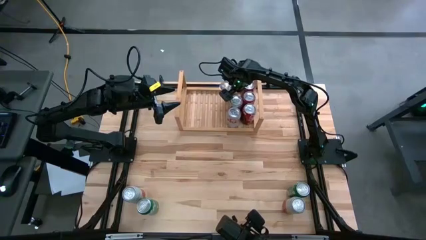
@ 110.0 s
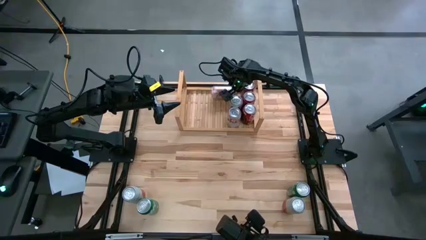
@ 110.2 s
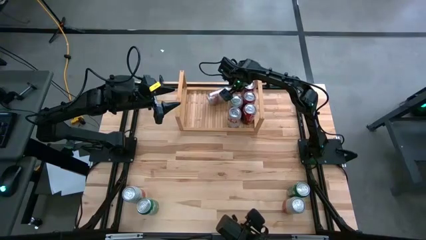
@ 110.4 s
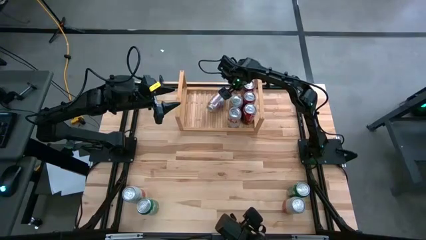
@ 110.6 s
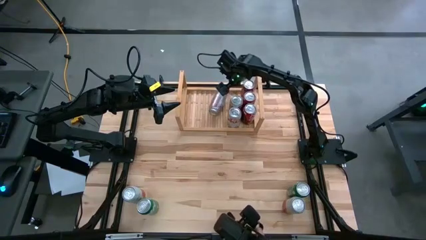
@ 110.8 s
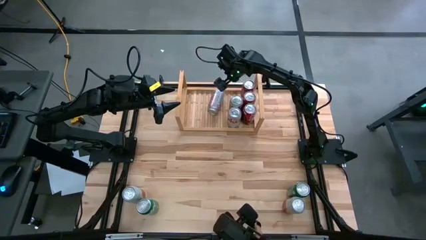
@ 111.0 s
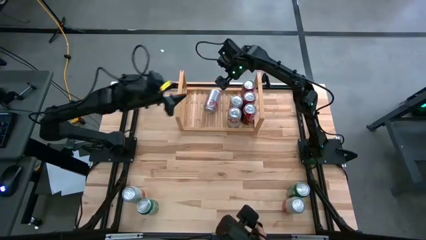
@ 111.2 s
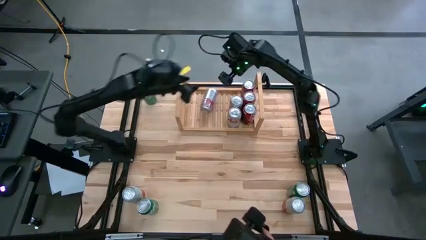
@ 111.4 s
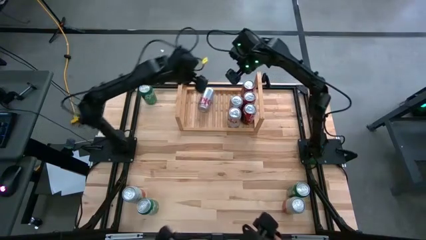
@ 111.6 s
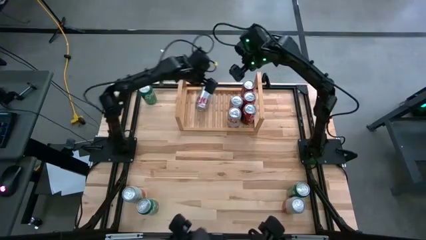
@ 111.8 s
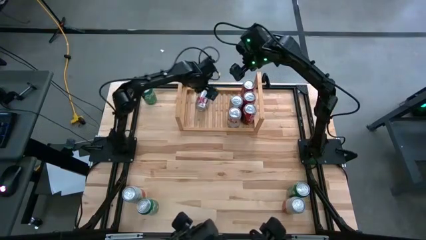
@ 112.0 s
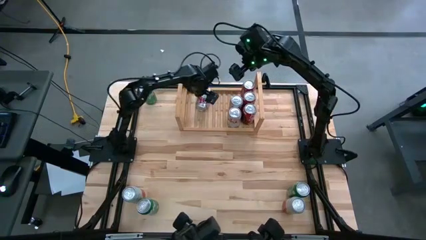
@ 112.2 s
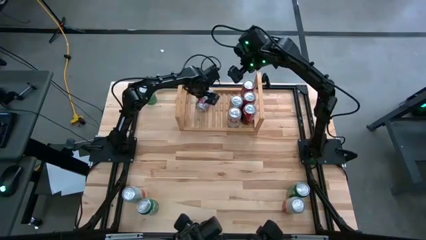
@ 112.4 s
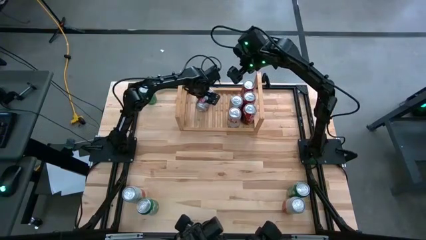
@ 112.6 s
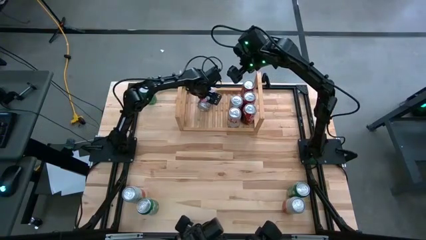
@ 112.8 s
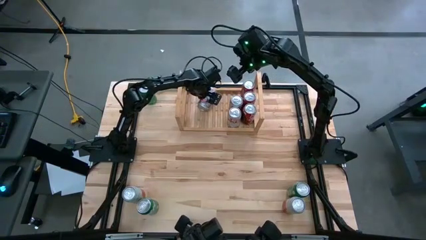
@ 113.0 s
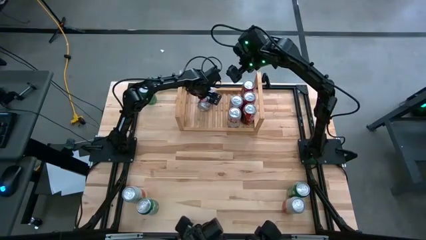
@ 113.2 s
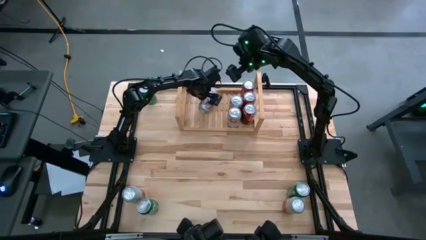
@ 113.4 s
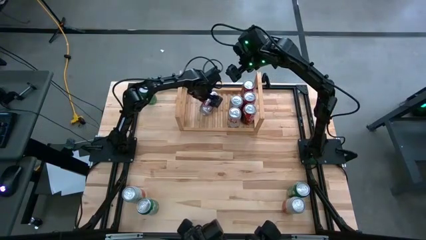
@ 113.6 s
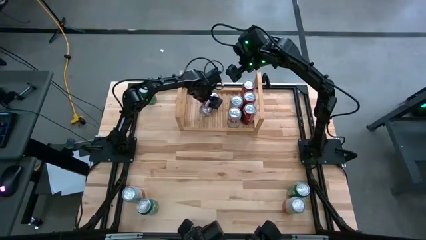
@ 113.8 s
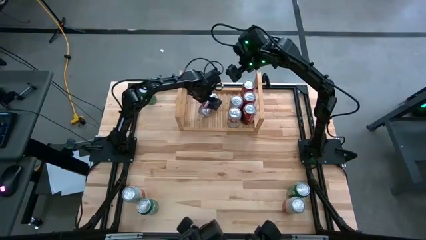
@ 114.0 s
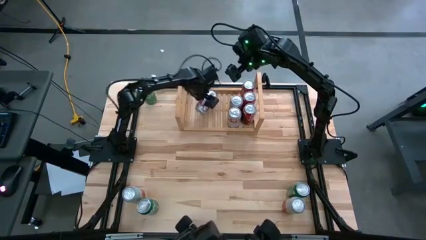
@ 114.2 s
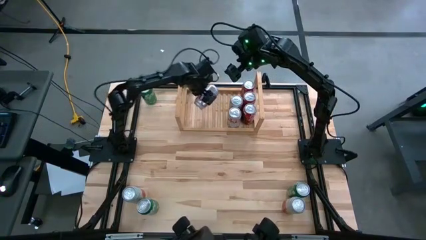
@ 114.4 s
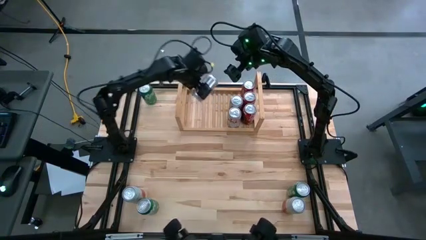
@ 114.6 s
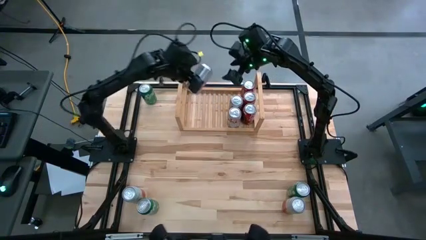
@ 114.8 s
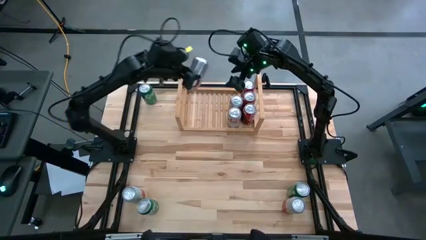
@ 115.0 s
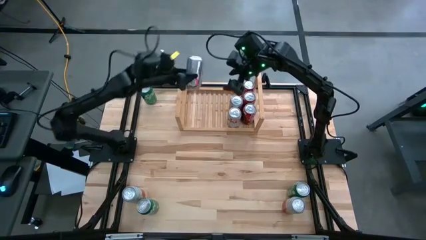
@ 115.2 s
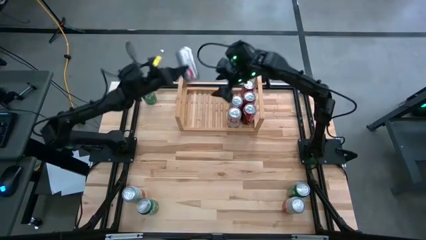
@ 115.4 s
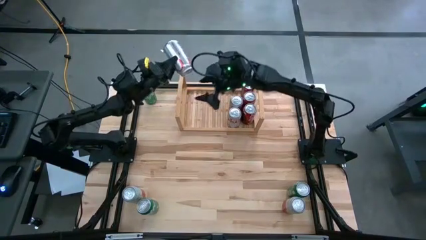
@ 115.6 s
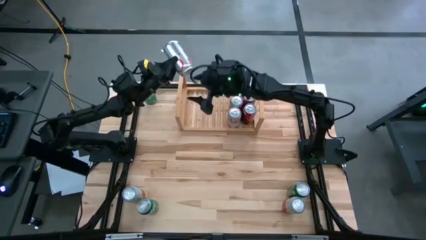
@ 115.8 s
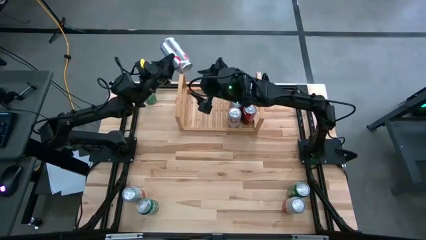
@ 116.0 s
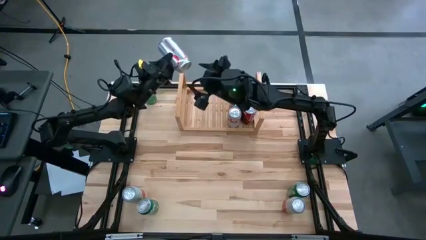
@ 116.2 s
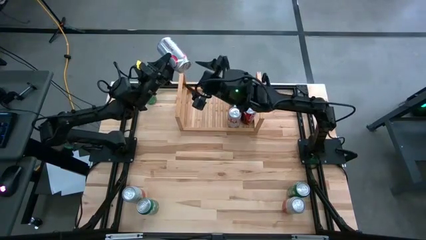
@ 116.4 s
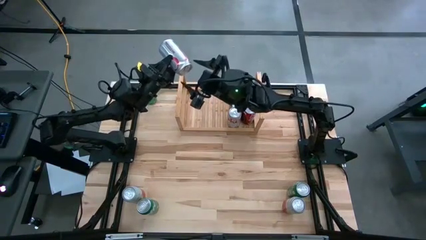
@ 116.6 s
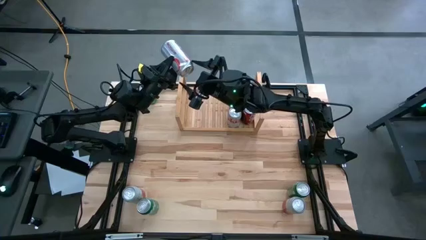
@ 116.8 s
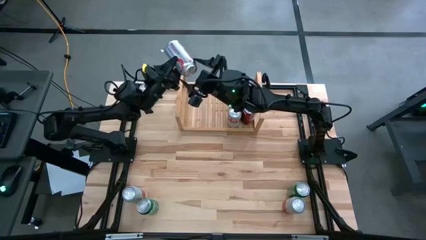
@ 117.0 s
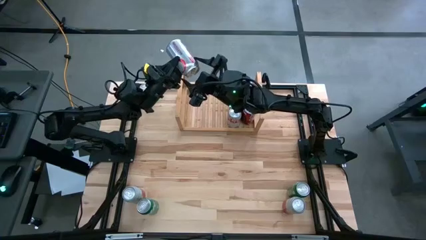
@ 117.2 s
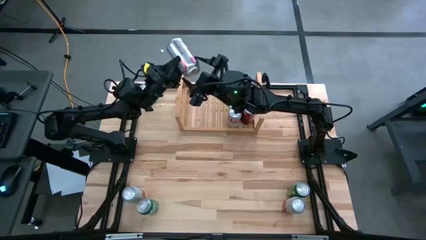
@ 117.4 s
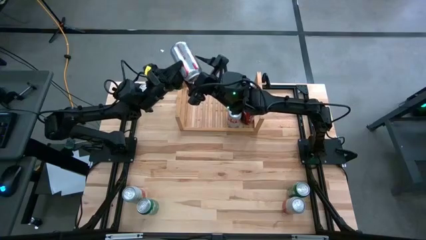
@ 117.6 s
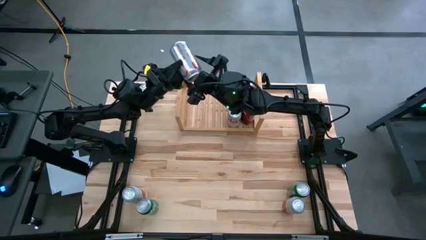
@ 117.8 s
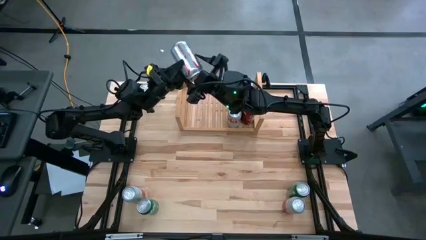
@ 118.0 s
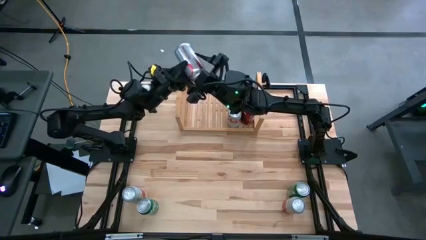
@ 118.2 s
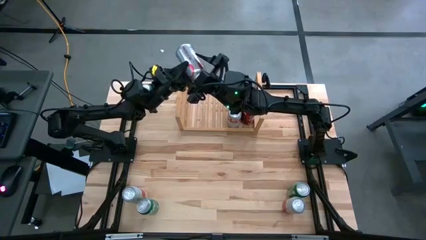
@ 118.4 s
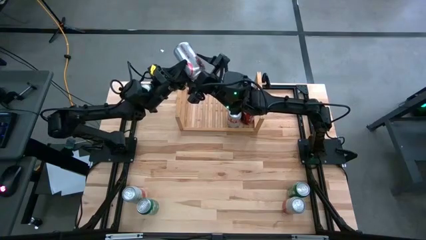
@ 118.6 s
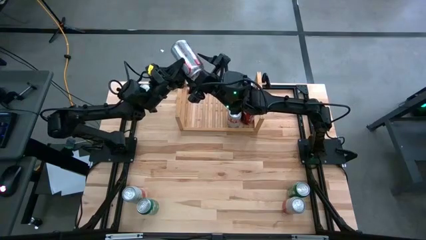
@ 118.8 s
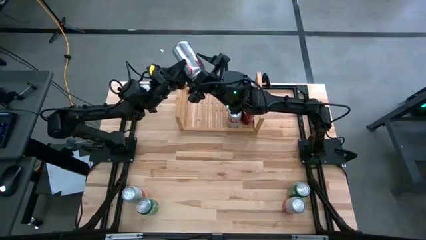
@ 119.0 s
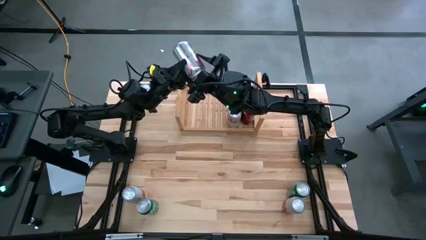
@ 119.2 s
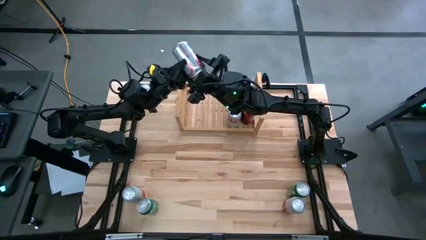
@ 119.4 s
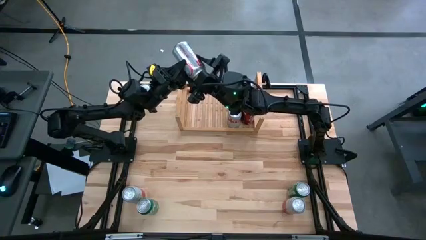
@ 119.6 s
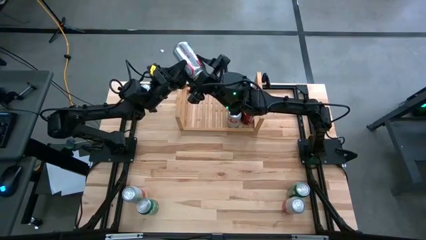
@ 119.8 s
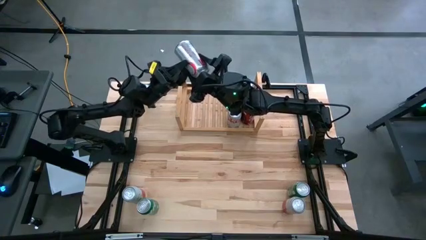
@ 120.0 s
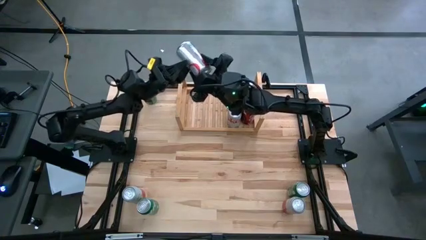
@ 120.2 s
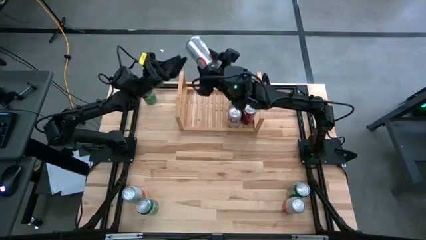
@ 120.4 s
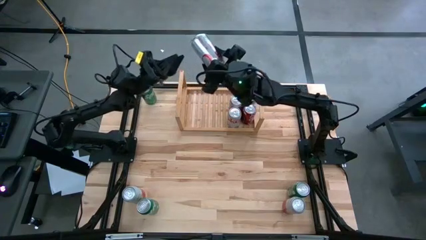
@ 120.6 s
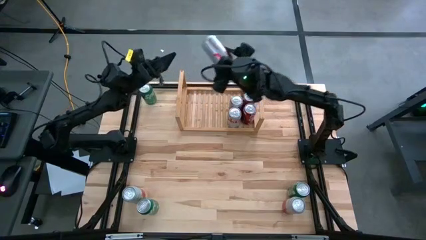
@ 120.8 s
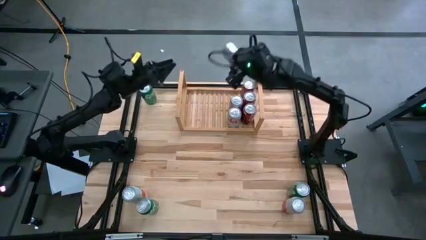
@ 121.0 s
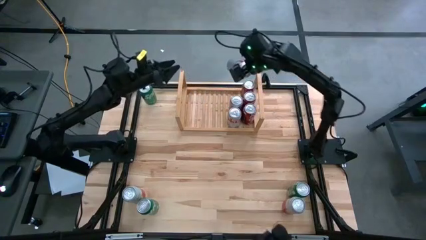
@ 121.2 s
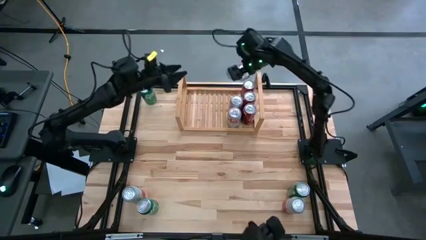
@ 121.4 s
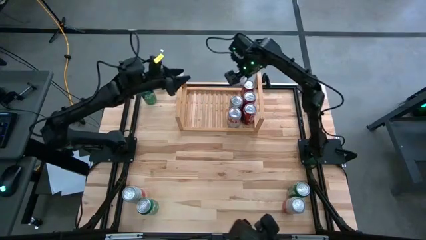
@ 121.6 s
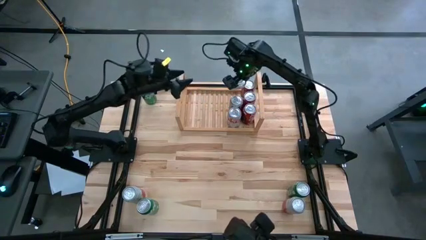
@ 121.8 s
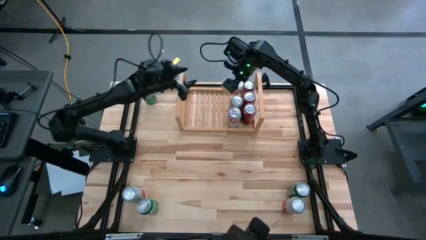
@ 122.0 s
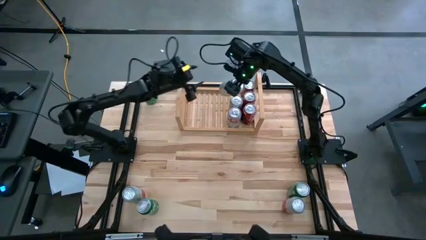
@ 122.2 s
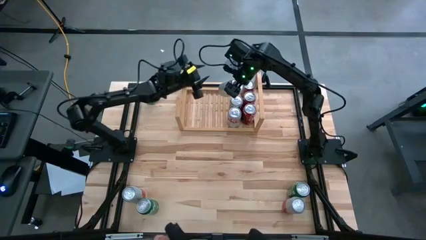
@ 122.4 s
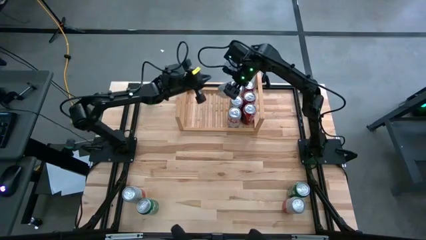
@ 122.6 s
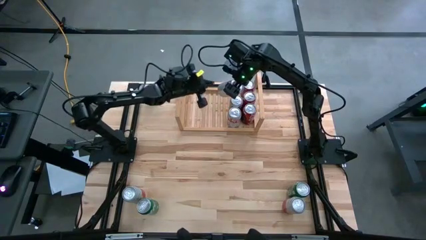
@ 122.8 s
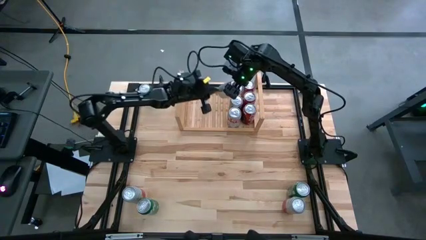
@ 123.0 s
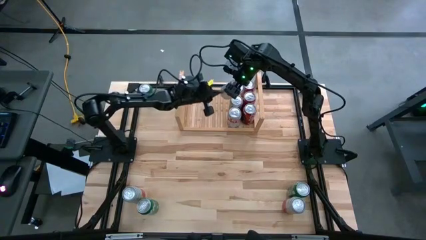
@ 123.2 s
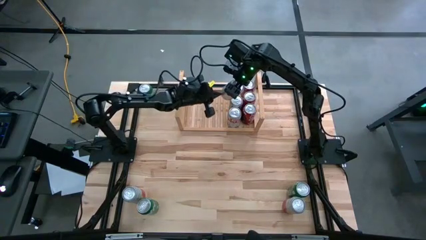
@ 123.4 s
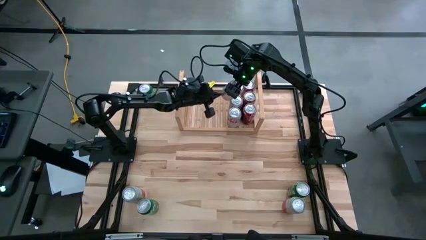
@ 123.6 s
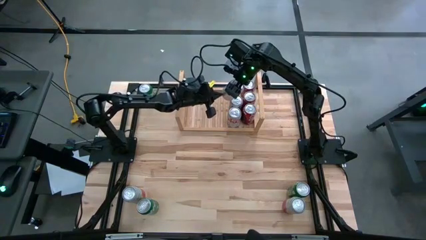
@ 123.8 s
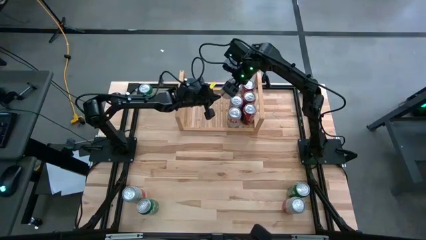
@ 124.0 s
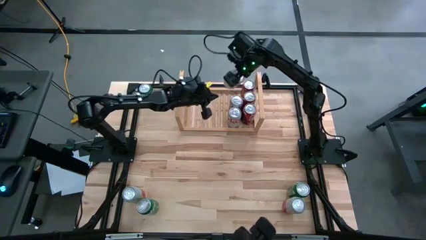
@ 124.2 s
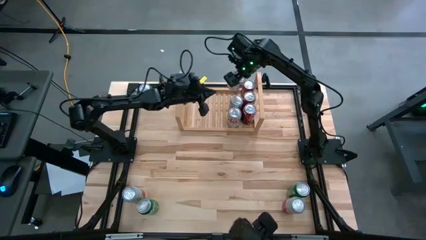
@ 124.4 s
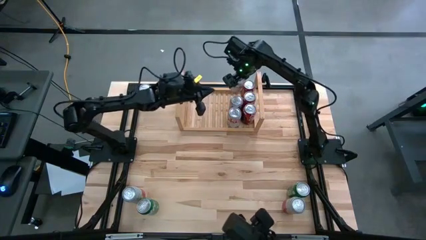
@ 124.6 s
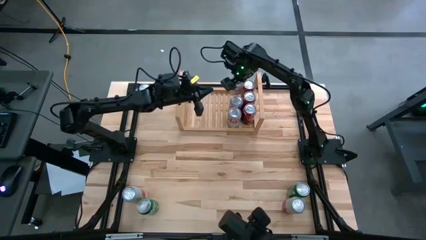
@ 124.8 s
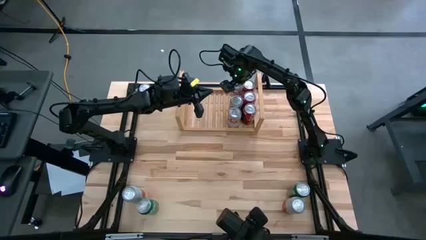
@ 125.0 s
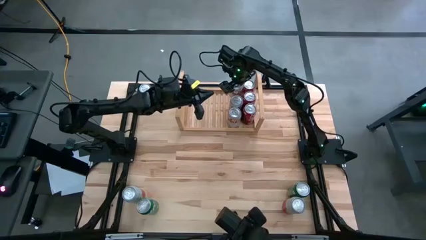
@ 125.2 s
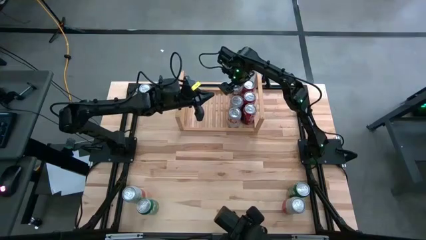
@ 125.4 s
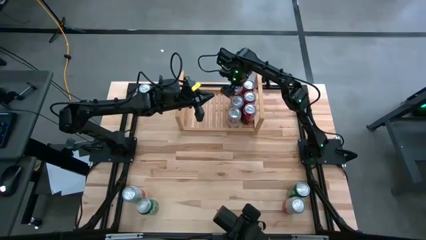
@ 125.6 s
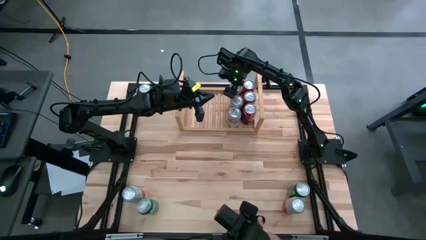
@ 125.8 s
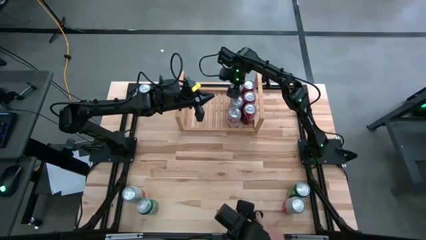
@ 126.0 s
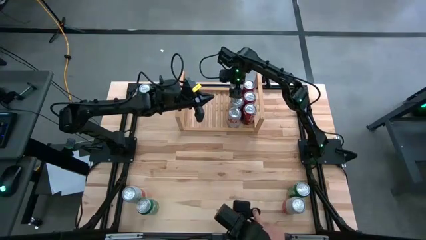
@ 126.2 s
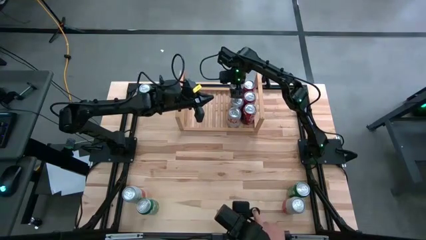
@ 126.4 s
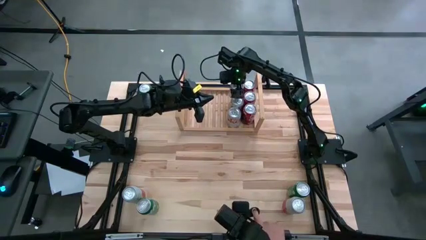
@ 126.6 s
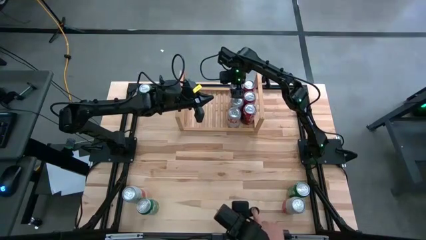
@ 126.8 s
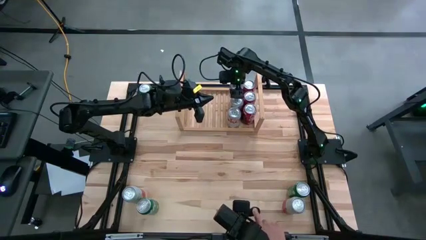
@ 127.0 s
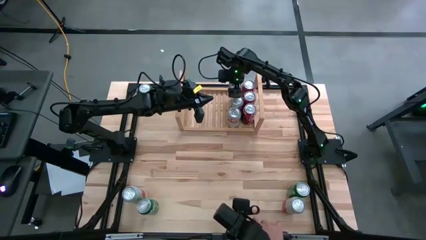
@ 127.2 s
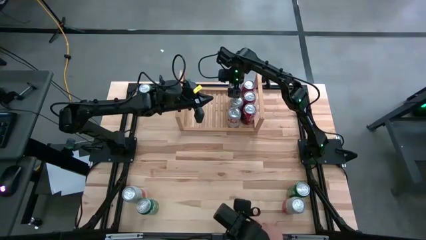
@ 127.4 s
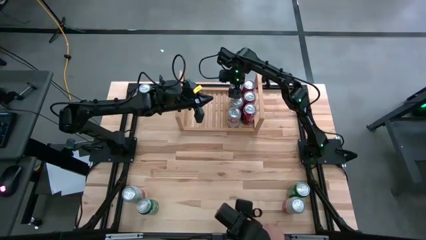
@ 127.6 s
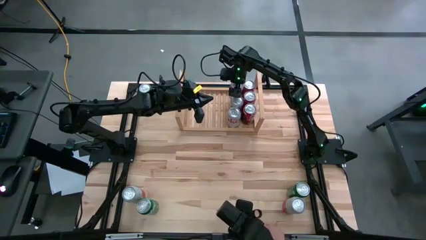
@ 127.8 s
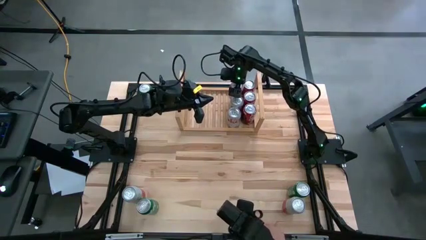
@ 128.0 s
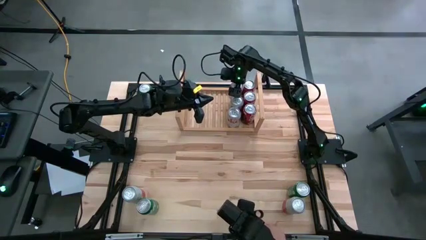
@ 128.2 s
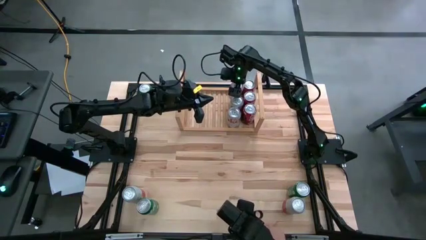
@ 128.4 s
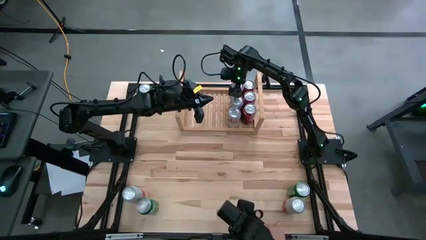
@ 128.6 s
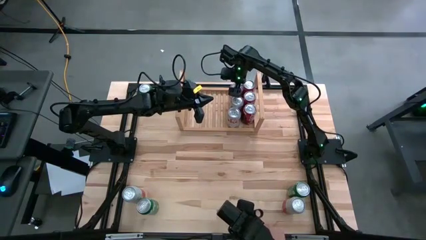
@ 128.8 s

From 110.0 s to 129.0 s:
Task: Place canned beverage on shelf
Put the red-silver soda can aligned with the other red-silver soda can on the shelf
